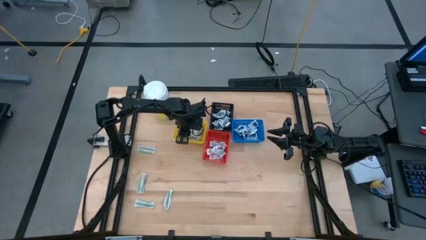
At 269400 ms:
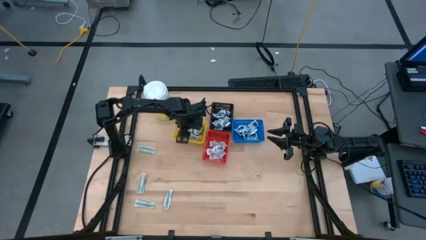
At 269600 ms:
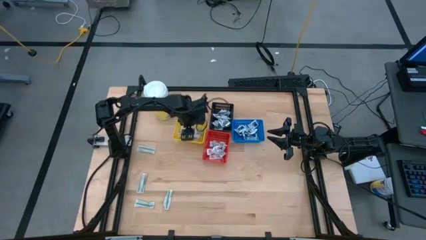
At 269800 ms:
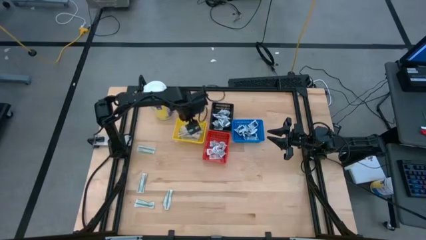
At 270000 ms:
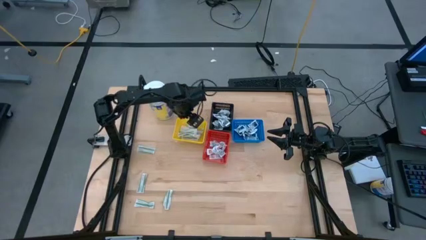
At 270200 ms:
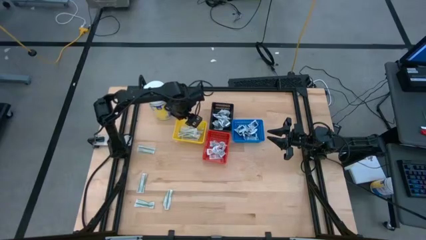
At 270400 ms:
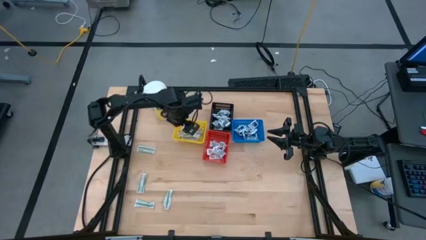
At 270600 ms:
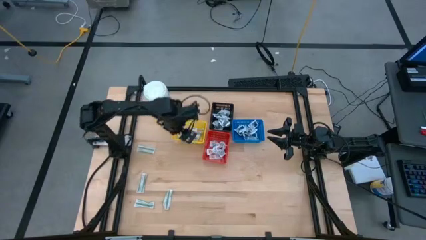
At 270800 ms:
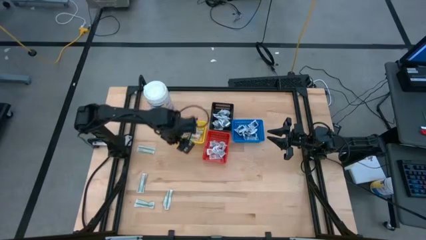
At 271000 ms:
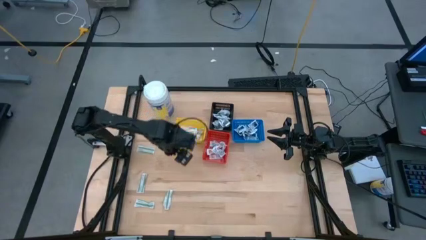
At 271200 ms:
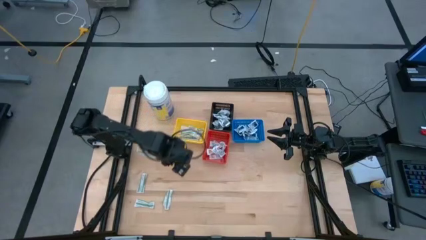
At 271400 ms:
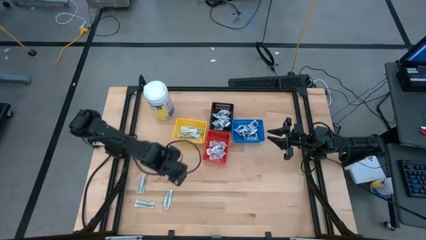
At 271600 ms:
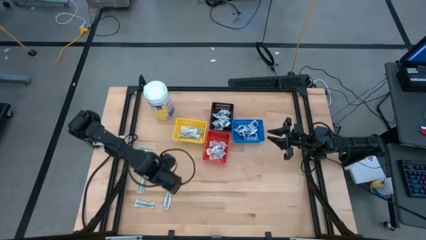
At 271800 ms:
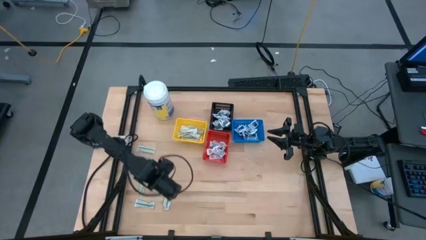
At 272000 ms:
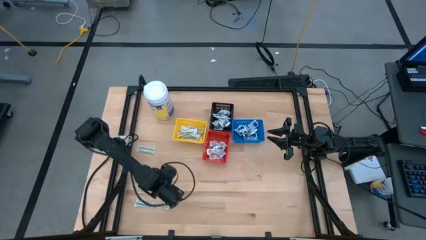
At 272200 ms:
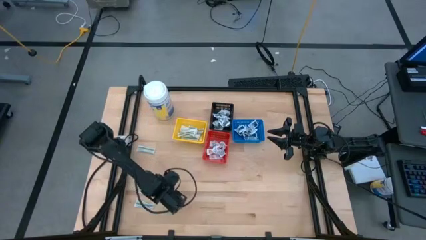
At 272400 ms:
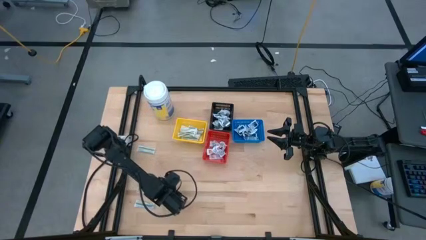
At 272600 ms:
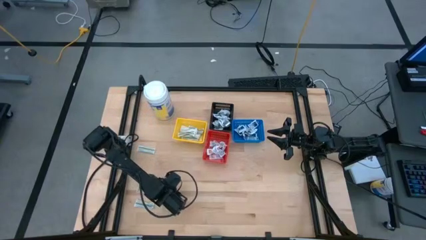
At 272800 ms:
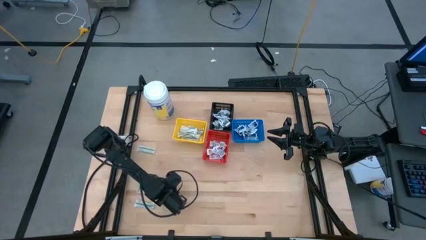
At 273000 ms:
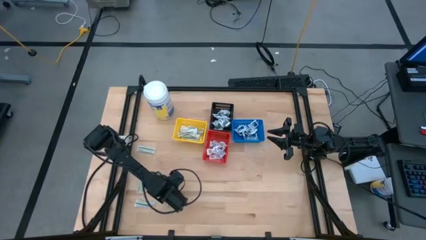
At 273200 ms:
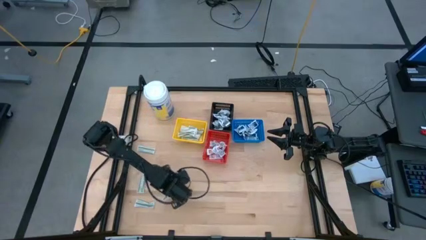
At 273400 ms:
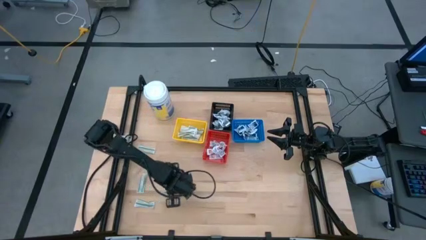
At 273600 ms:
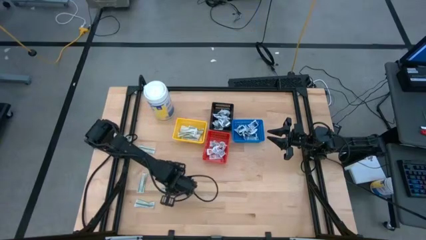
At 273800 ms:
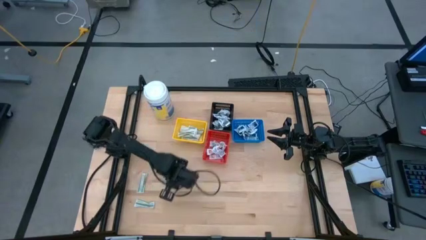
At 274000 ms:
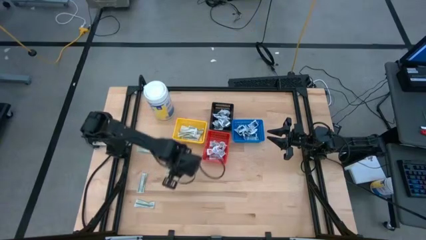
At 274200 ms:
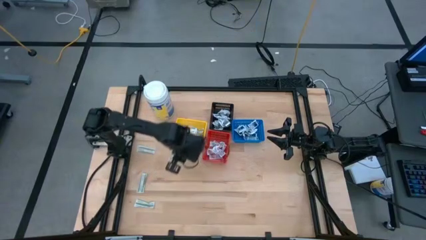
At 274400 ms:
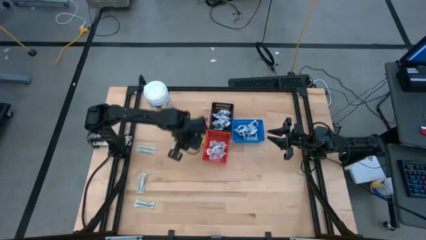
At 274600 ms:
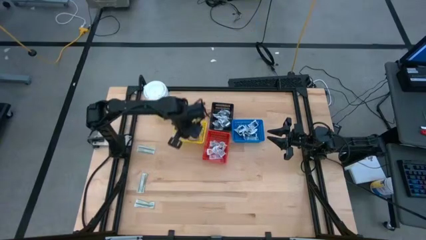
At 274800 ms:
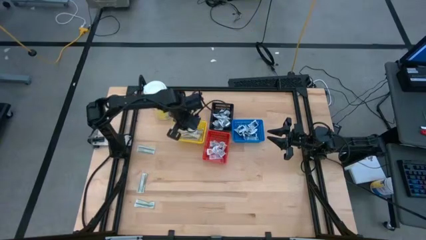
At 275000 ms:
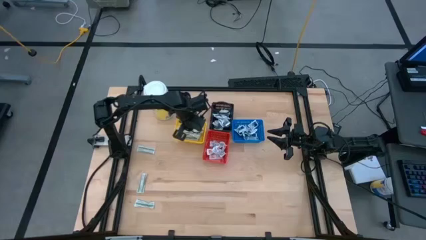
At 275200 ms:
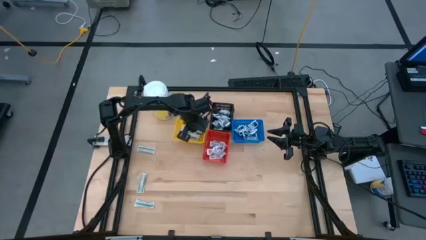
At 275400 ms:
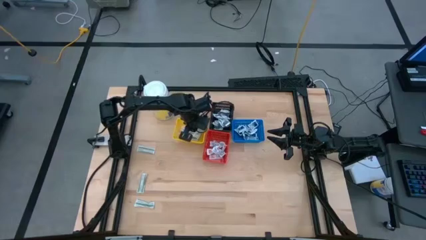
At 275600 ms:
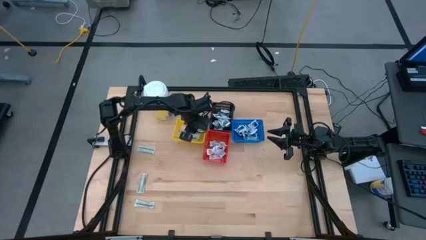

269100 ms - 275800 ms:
Task: Pick & Place First Aid Supplies
Put the bandage pack into the yellow bin

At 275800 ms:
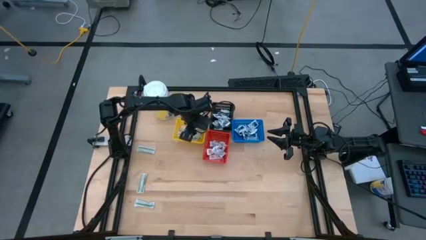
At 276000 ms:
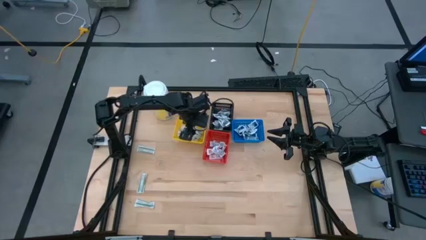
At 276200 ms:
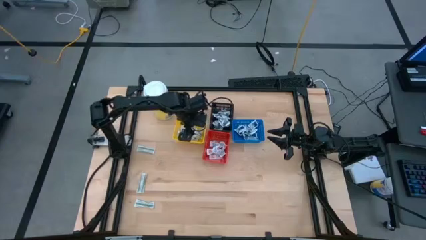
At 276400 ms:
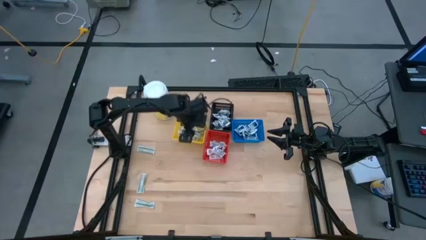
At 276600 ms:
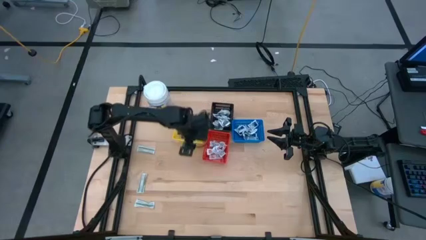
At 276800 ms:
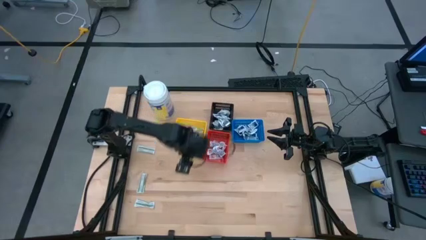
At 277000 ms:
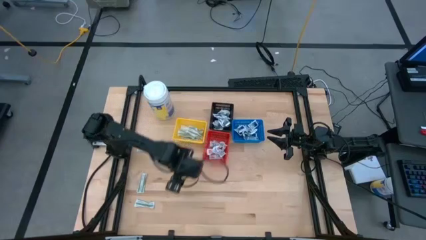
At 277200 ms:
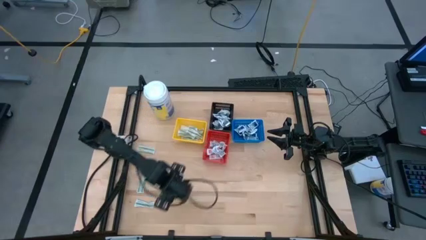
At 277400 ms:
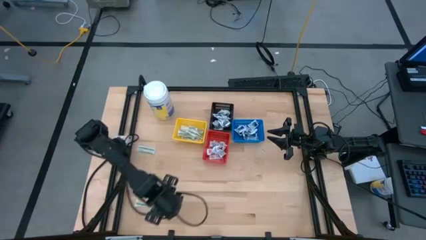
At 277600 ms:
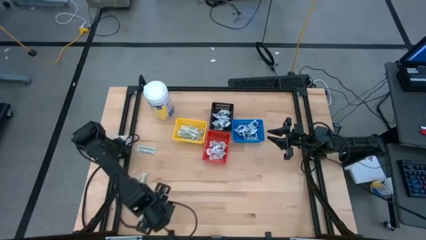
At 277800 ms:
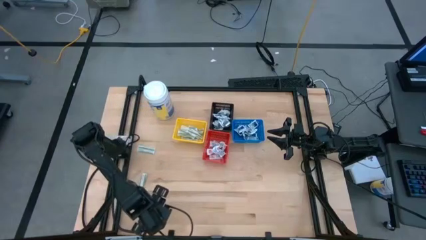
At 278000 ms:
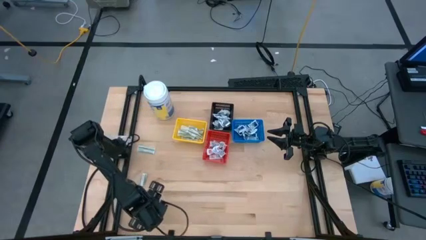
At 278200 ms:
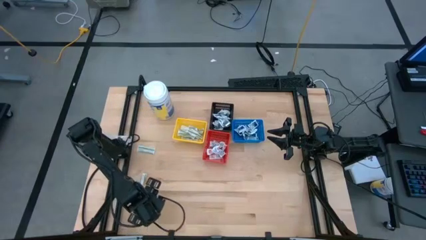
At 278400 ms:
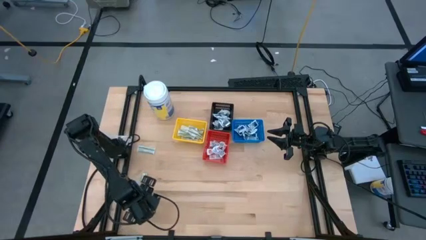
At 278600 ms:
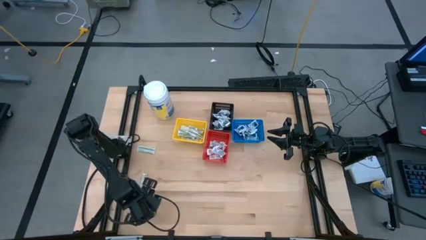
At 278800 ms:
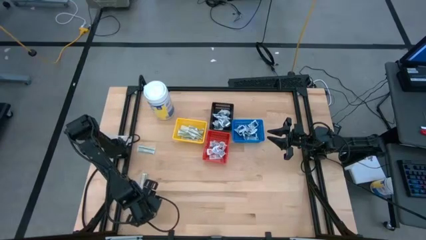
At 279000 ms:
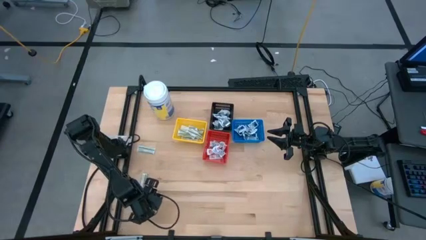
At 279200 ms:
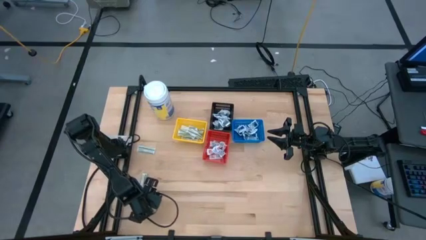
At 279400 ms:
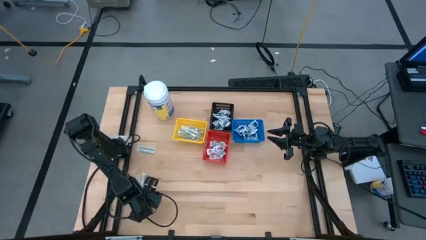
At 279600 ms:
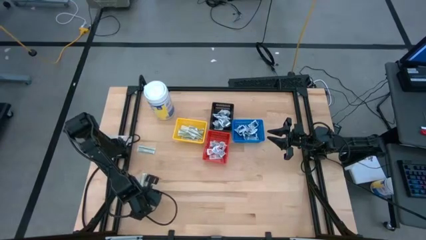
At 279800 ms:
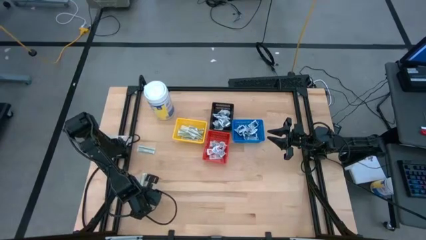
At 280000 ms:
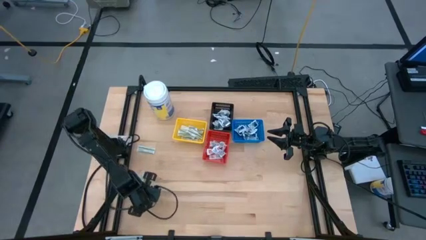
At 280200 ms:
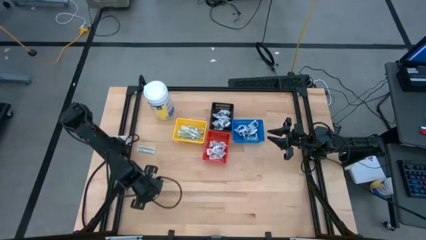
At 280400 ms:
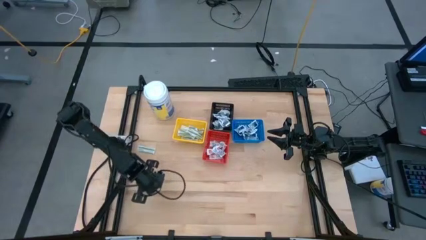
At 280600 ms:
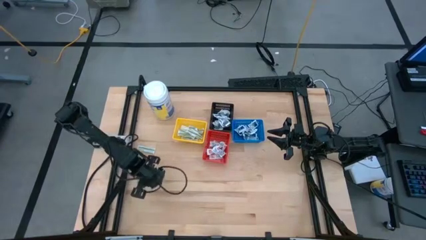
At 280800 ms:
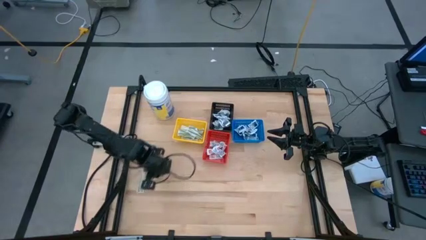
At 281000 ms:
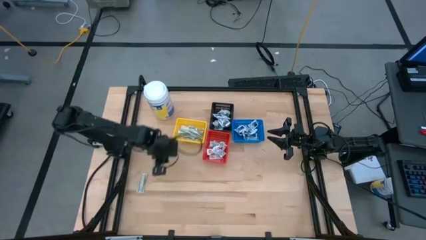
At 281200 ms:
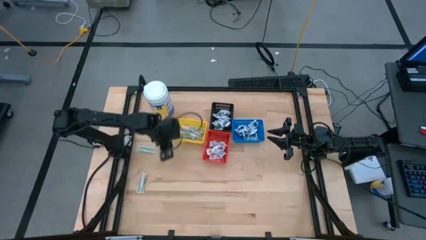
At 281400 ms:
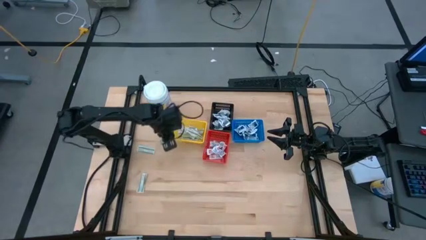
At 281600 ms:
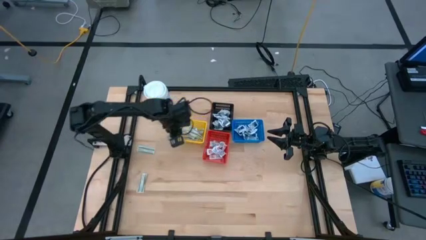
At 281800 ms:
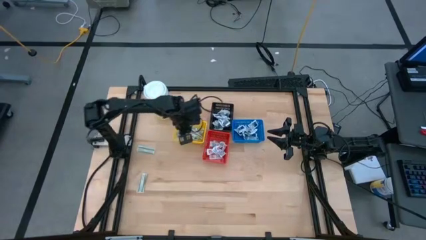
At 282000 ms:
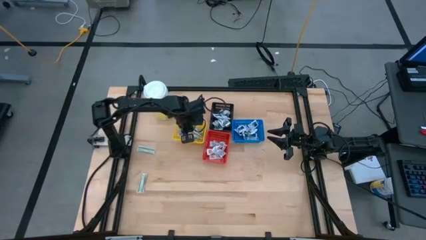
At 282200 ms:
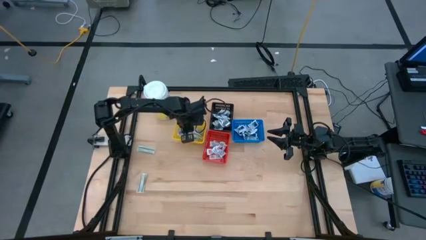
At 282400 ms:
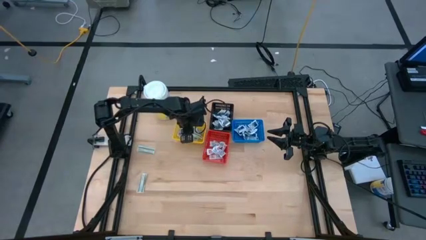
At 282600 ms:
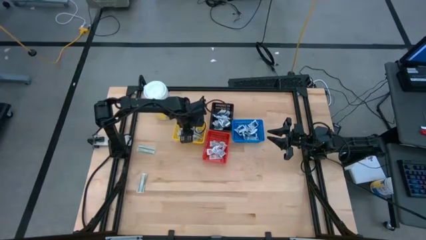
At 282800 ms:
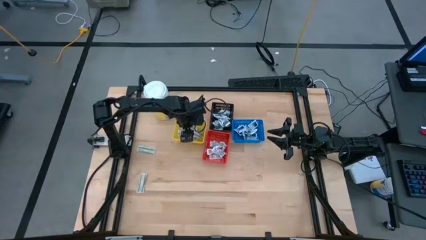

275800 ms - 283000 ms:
Put the bandage pack into the yellow bin
